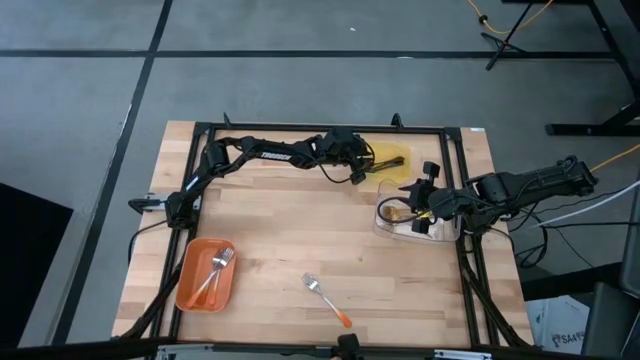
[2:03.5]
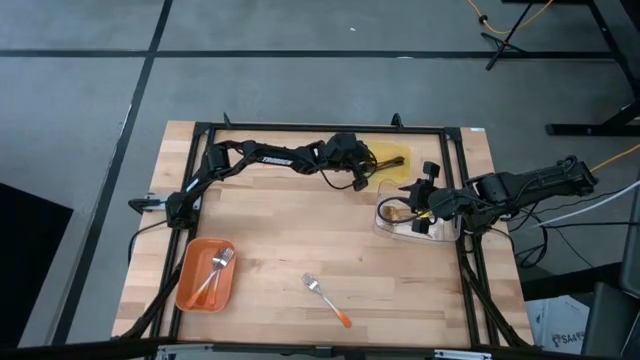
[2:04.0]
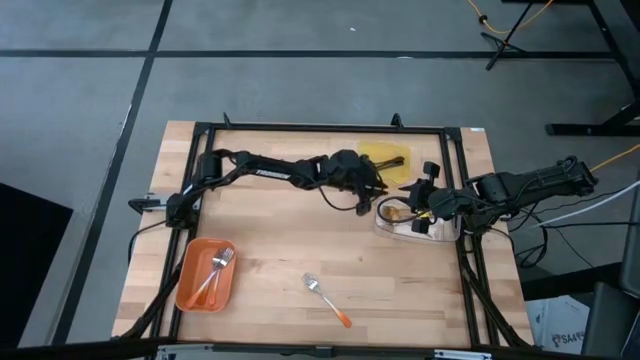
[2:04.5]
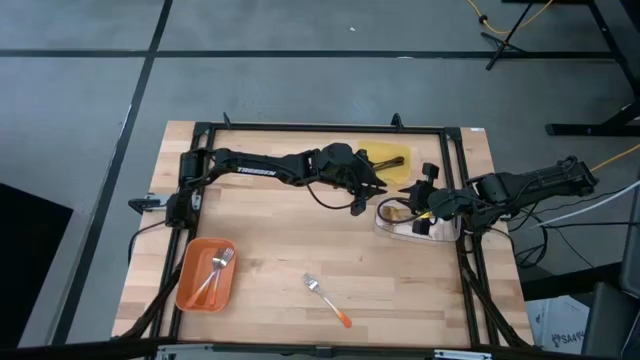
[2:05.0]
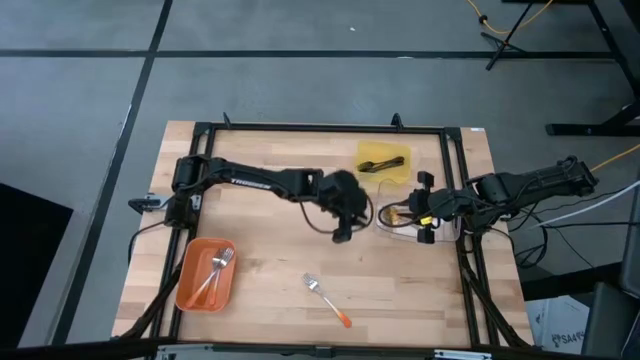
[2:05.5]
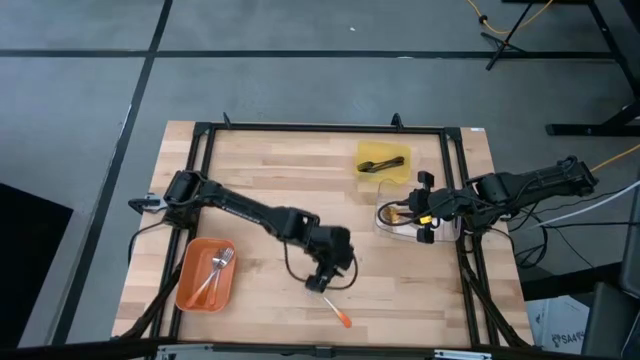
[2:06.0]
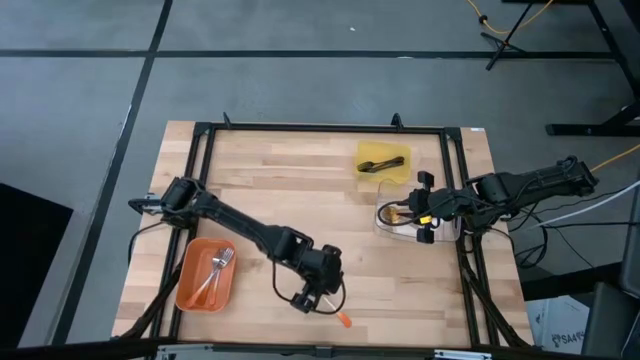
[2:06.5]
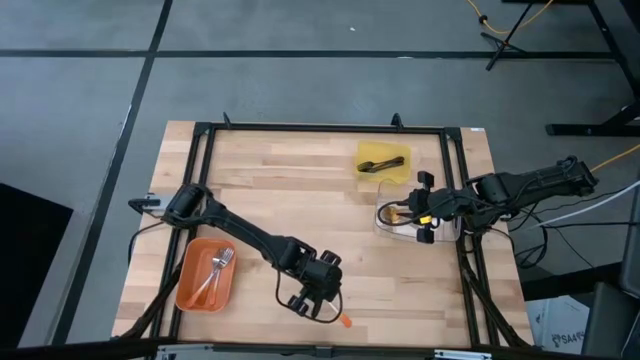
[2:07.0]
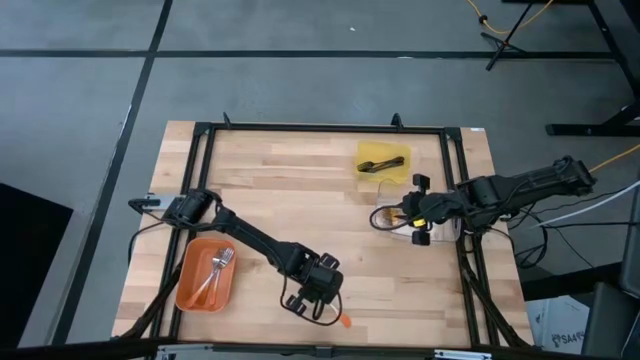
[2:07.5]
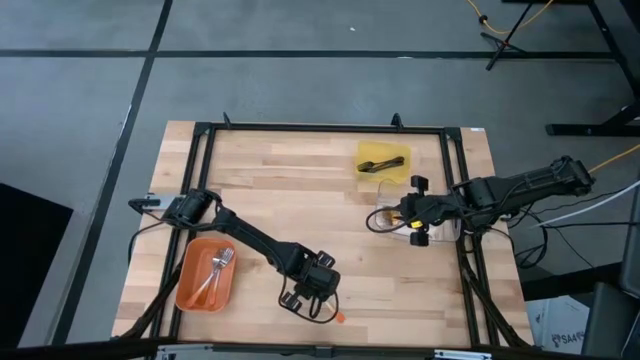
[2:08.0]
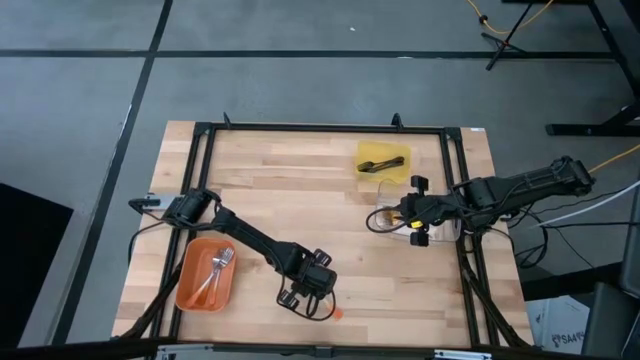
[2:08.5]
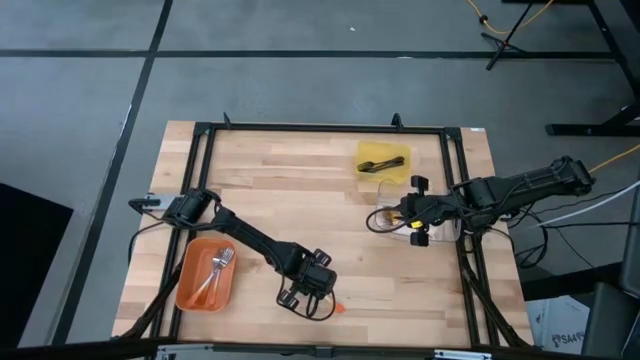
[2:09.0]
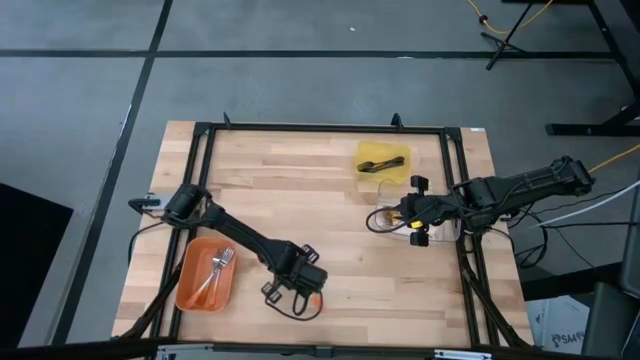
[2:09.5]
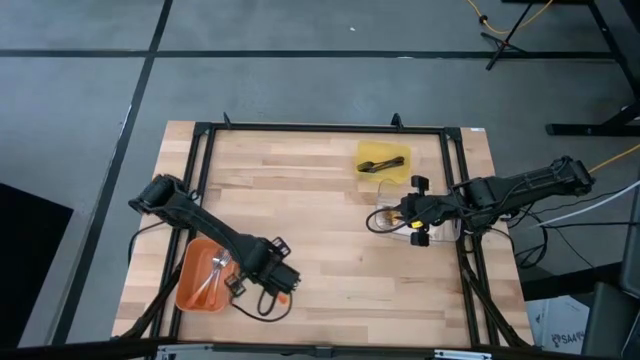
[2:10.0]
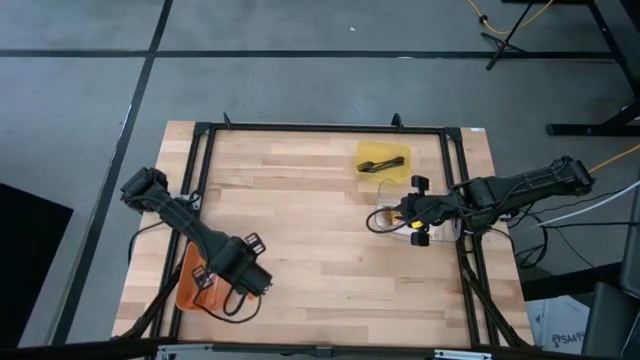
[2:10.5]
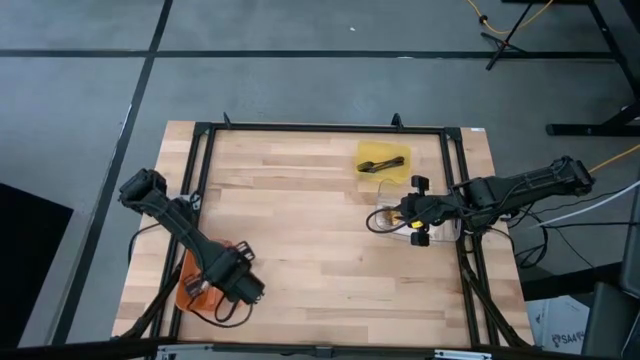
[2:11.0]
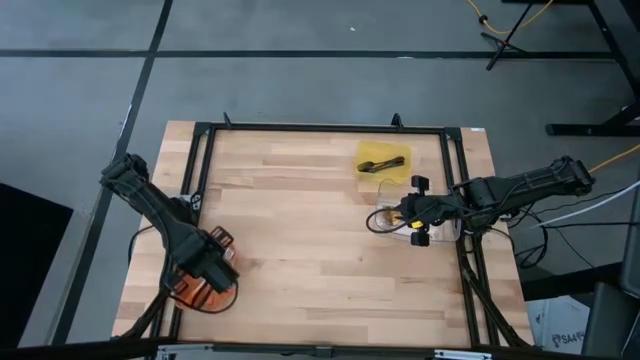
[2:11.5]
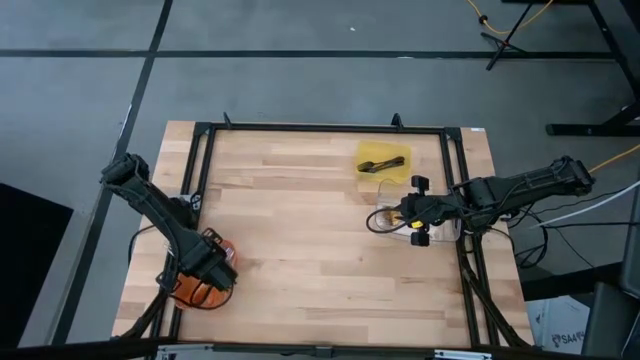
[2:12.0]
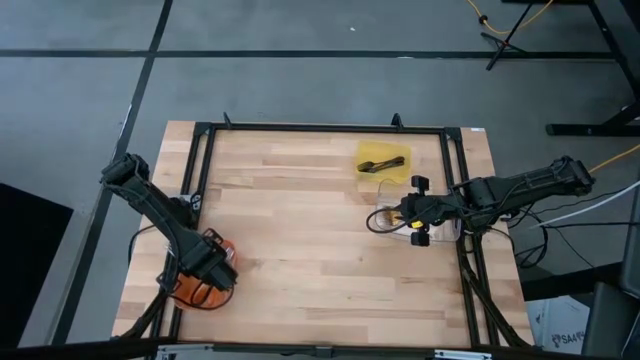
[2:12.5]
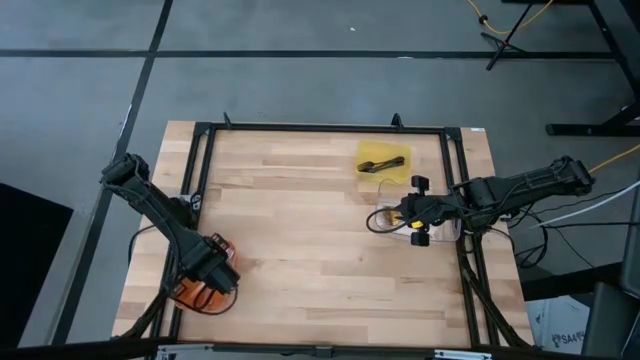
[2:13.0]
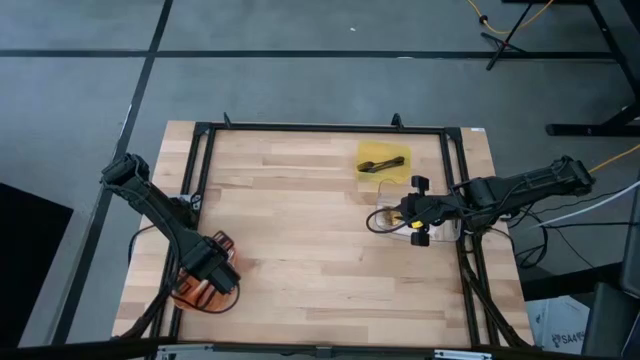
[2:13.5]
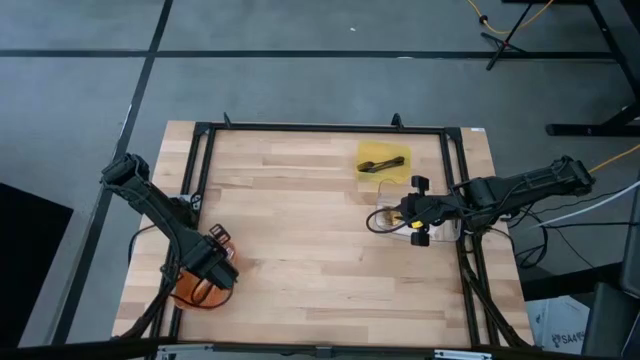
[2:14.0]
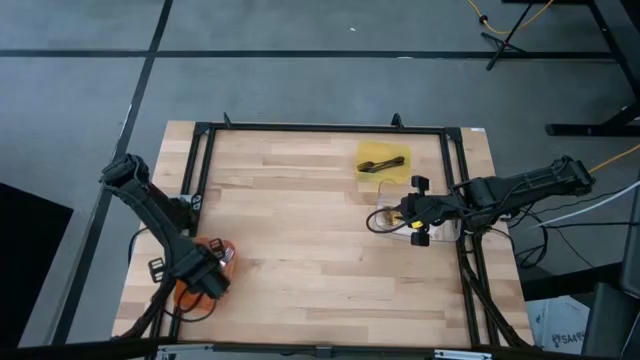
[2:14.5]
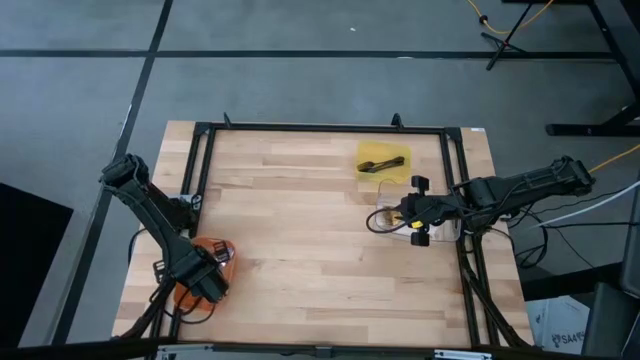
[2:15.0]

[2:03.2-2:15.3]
Task: Sort silverware by color (type)
Put the orange fork into the orange bin

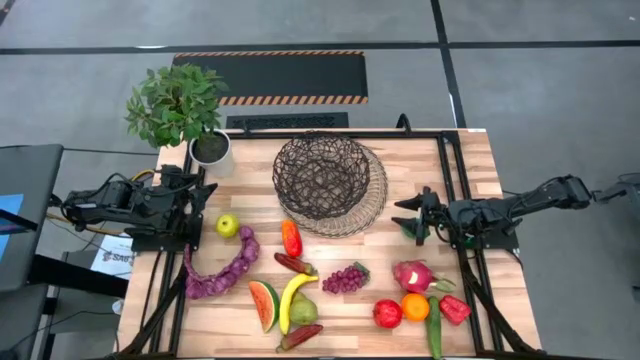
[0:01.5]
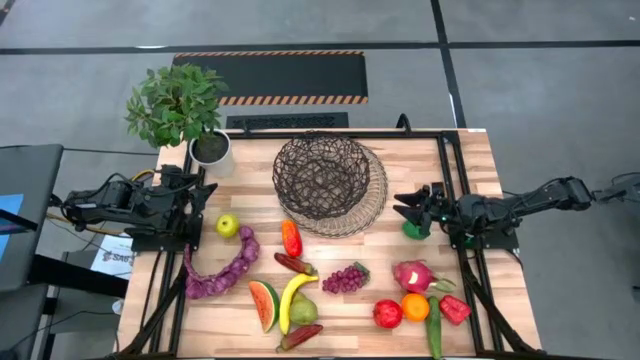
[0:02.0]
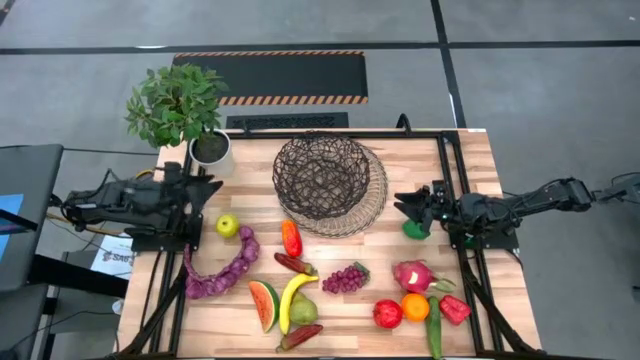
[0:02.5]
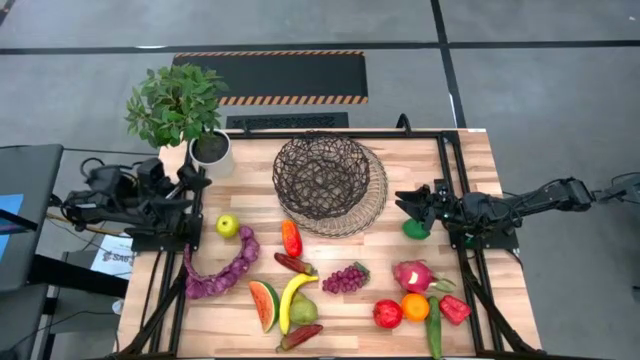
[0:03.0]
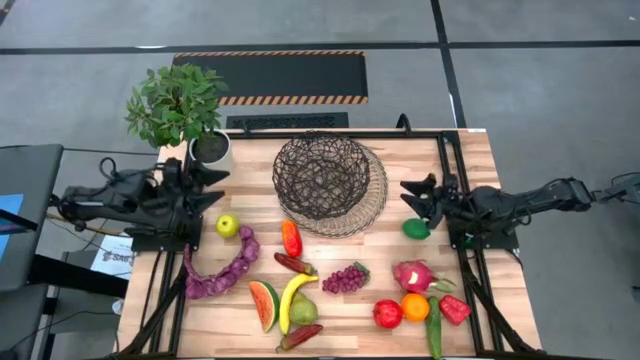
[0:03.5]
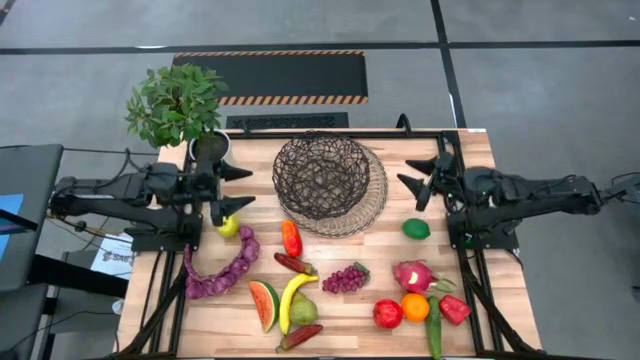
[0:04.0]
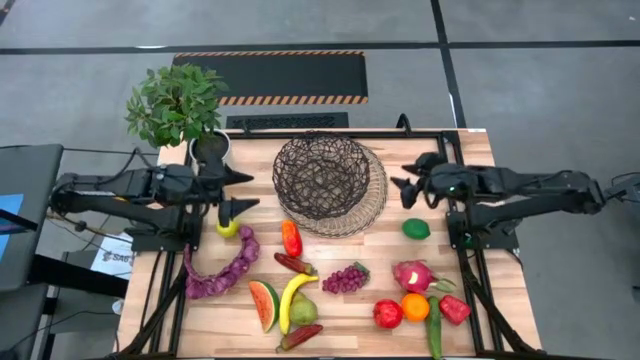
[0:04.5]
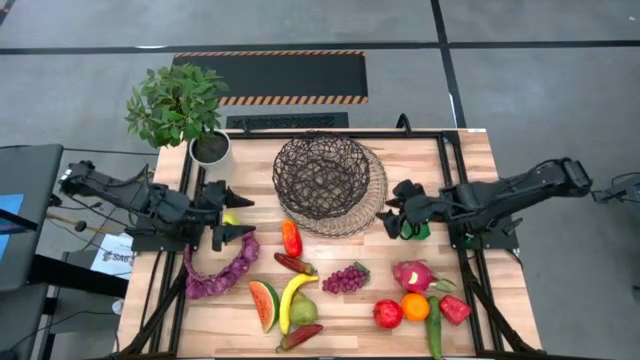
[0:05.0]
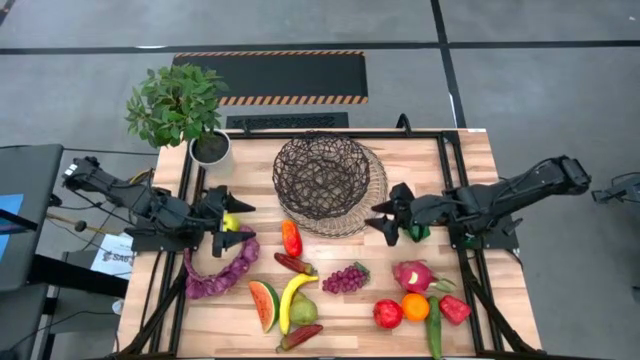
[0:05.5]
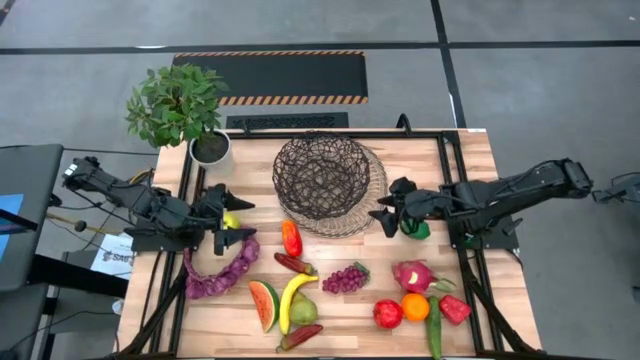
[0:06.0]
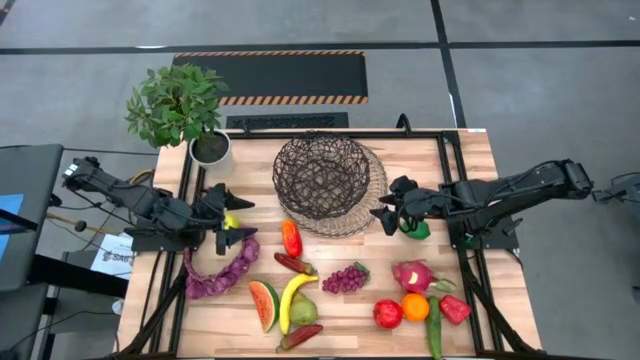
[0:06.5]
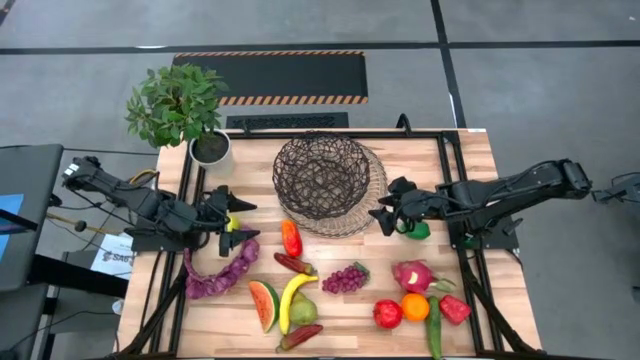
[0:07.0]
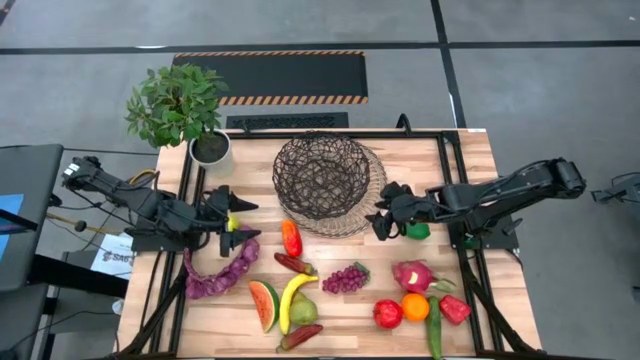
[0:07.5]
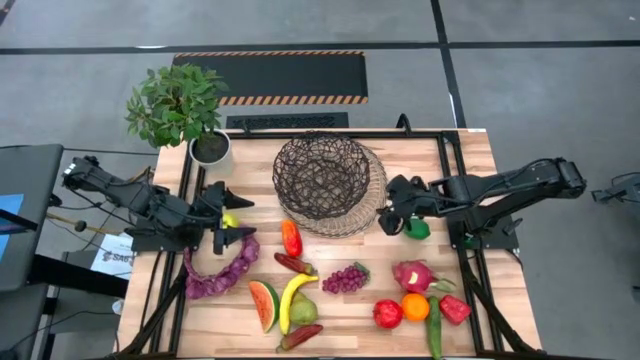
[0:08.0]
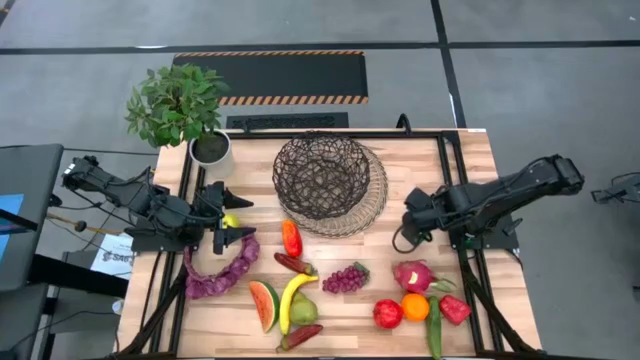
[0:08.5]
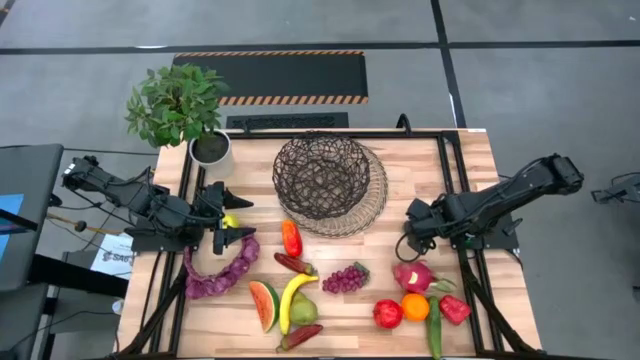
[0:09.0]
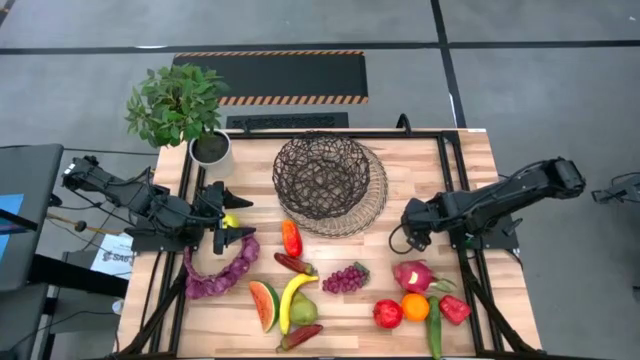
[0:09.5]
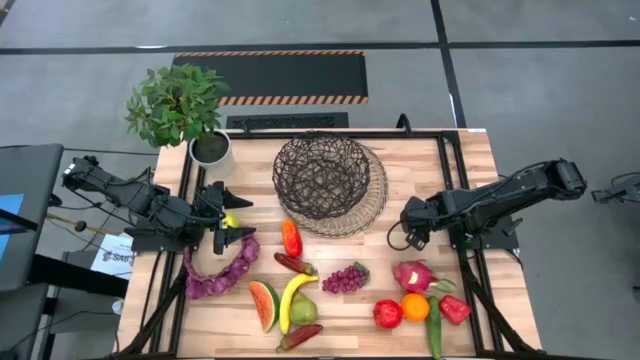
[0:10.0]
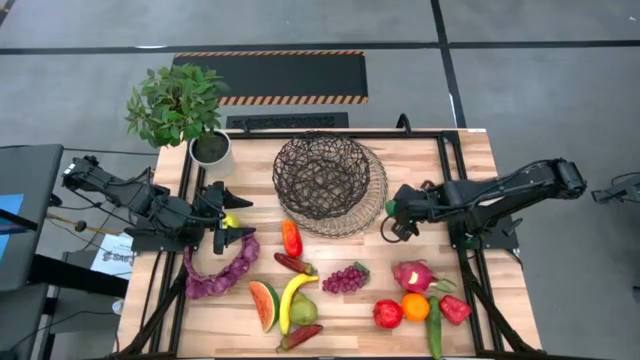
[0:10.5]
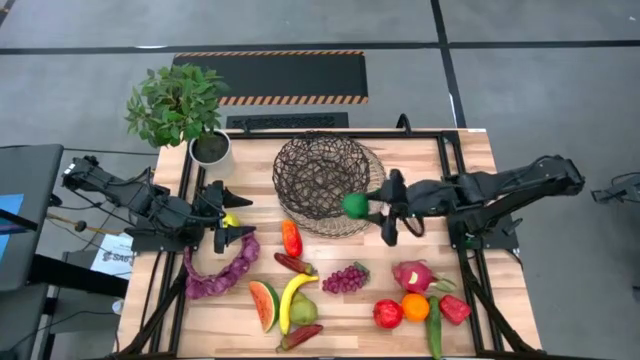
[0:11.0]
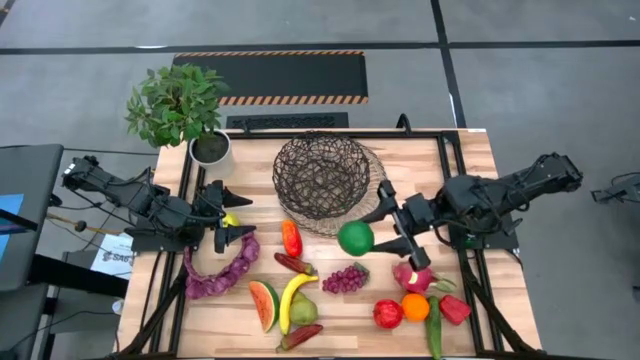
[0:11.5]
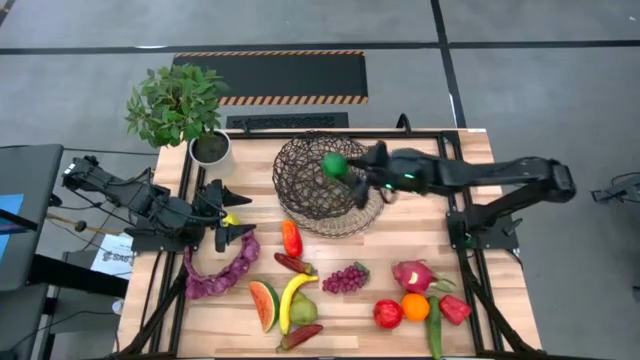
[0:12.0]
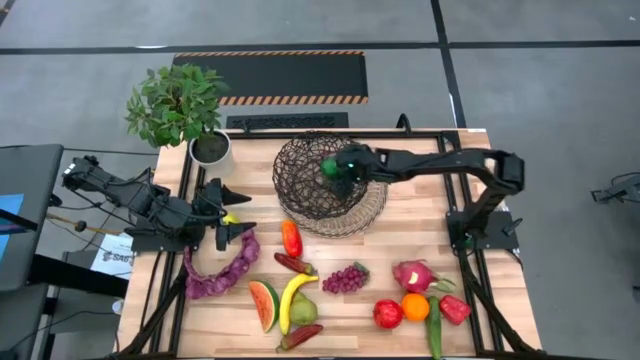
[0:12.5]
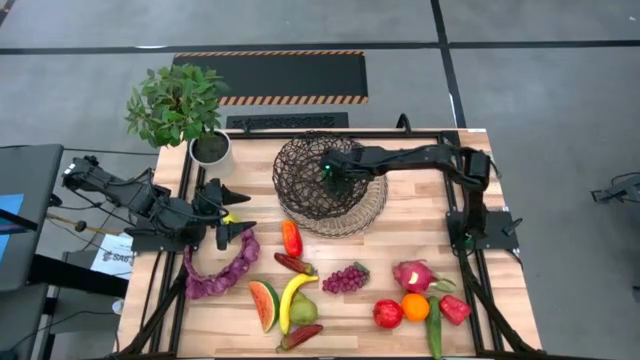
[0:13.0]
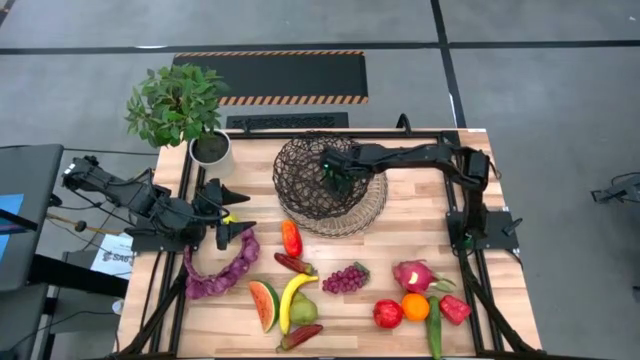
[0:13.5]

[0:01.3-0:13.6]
Task: Build produce basket
Put the lime into the basket
